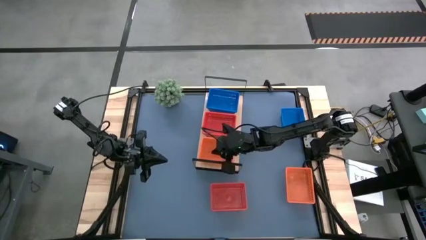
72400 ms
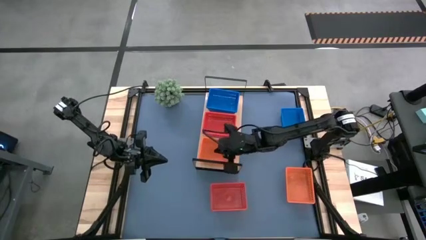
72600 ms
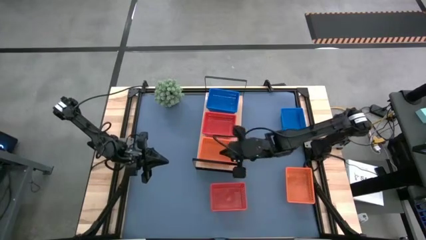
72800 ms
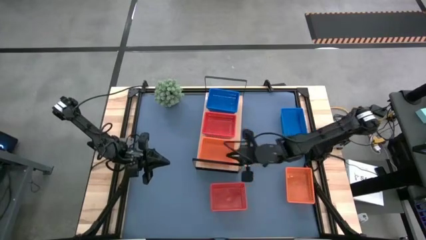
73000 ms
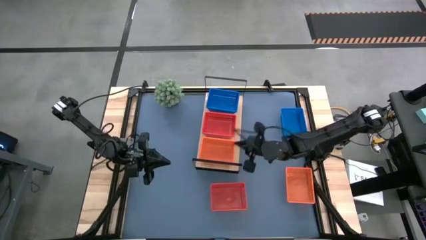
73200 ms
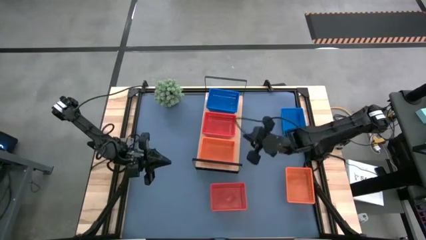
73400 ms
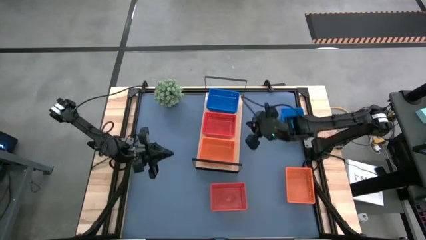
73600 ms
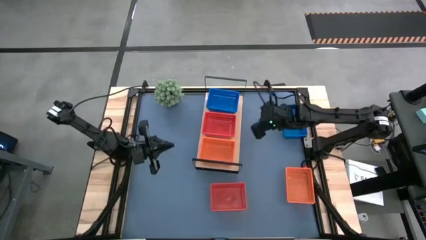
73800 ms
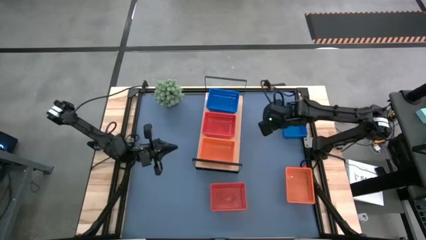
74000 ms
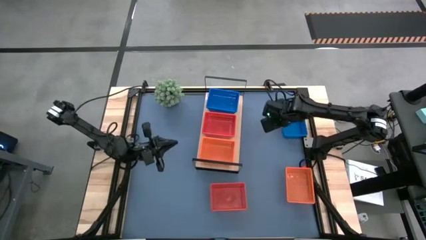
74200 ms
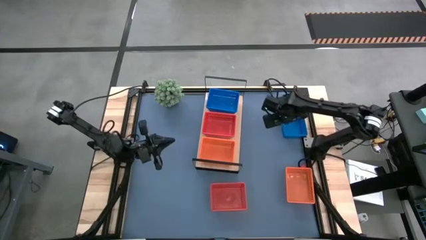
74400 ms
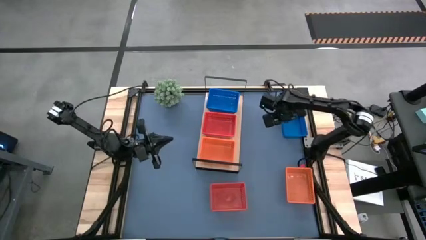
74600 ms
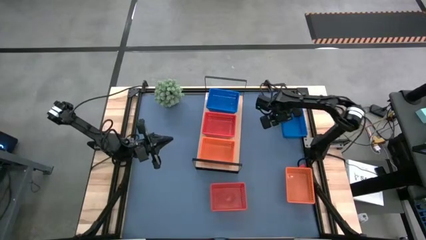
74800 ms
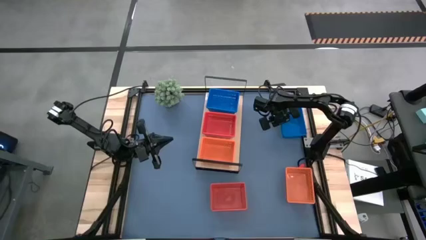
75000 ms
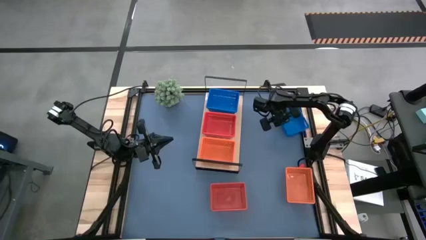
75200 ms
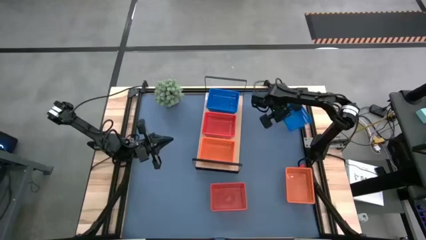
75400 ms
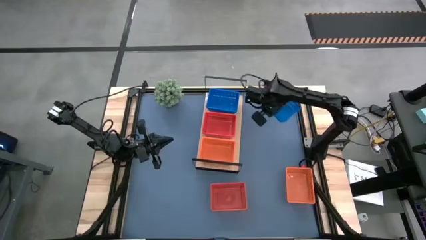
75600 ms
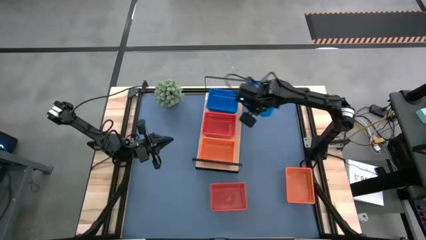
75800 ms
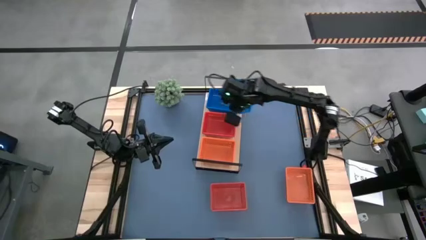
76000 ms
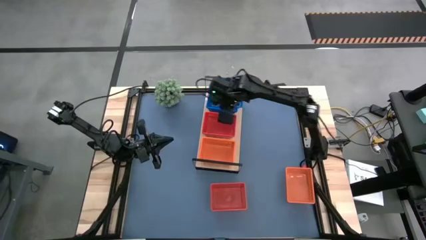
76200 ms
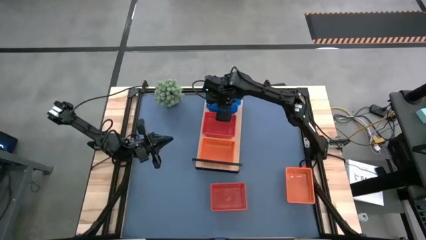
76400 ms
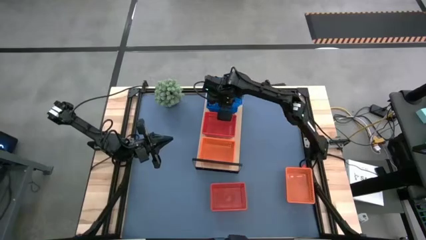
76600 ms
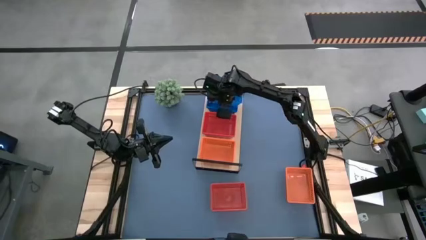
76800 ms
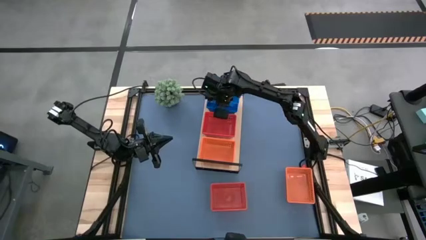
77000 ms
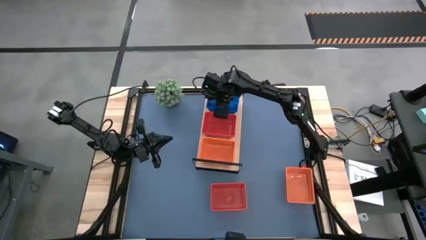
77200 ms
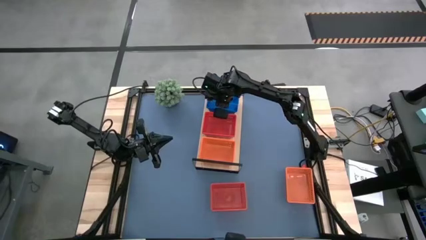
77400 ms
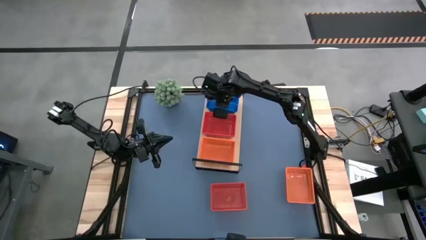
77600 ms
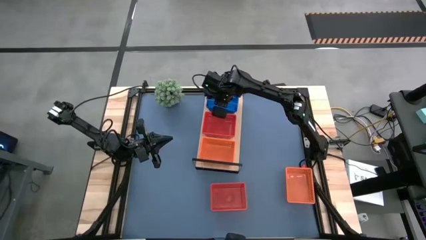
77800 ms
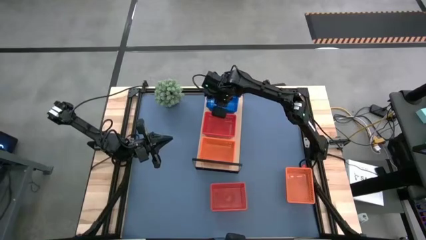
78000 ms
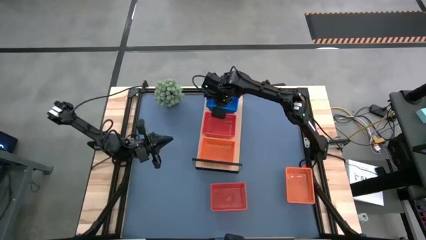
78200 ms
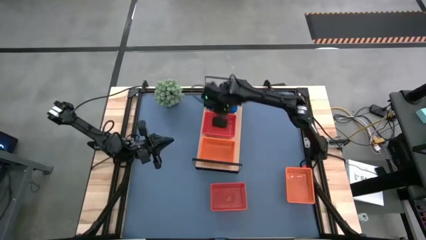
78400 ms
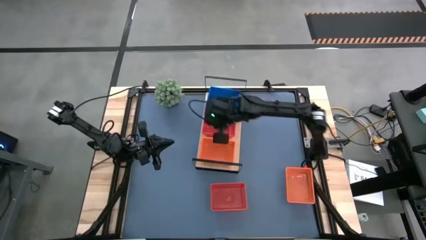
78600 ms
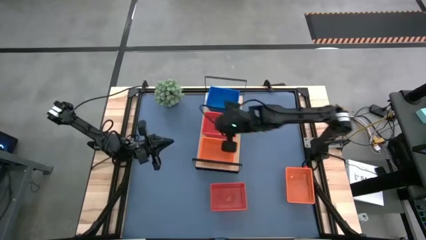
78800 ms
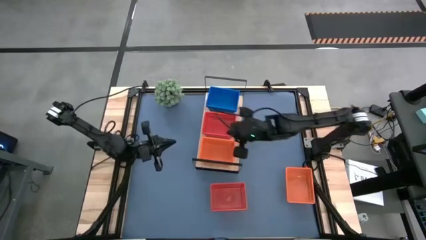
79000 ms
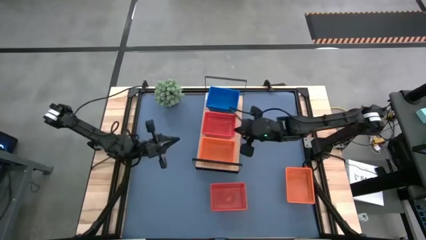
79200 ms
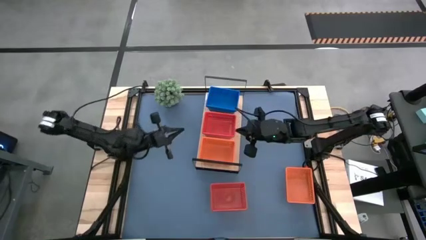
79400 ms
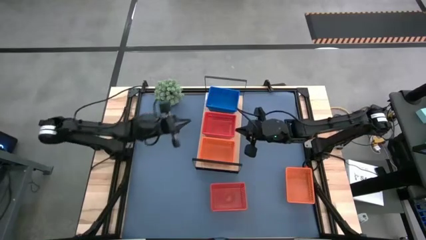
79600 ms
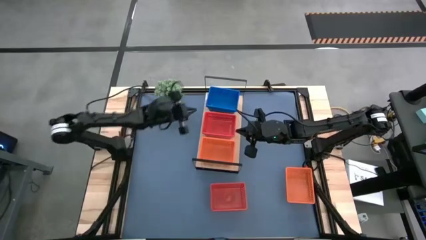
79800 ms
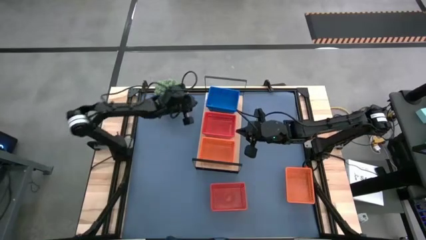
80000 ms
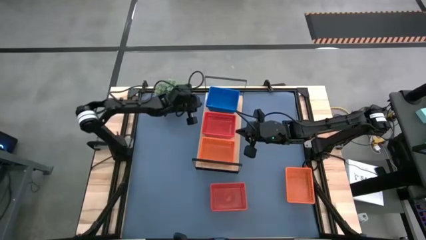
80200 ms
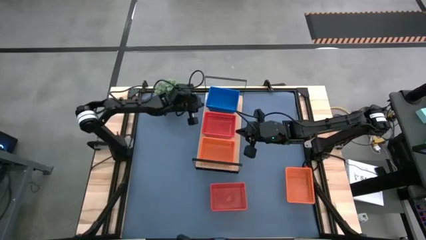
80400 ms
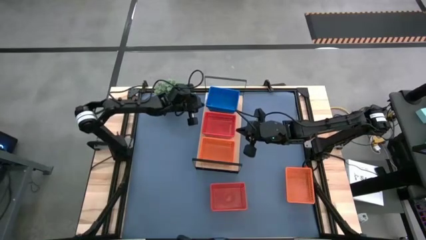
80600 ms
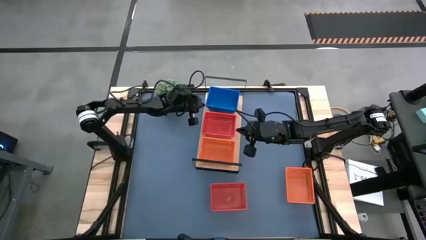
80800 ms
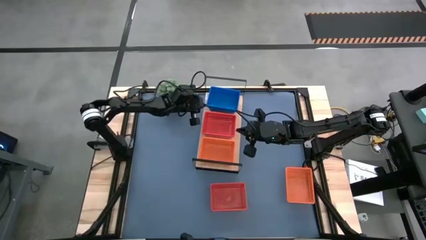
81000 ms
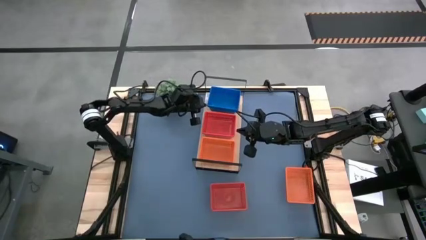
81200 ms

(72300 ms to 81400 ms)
Task: Stack baskets on shelf by color
Stack the blue bin on top of the blue bin

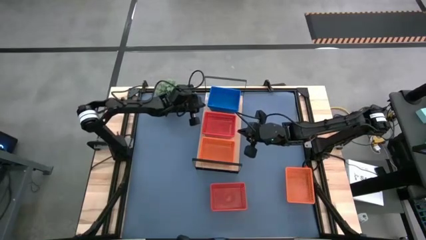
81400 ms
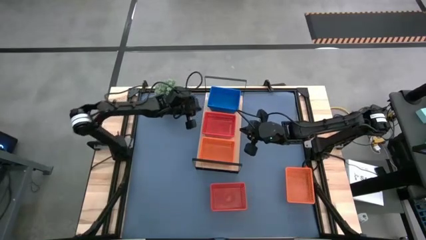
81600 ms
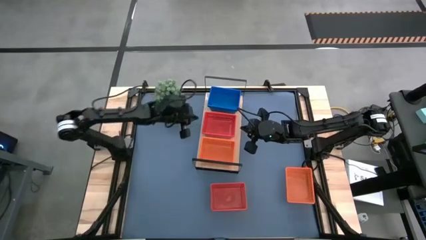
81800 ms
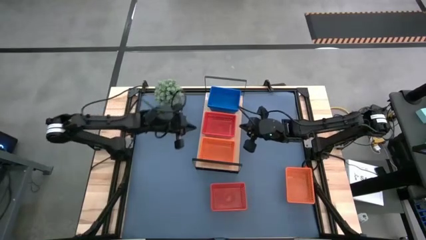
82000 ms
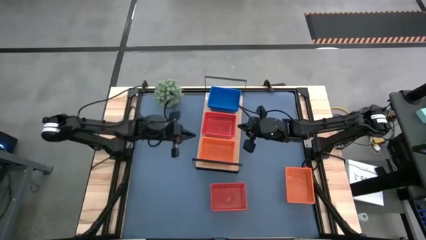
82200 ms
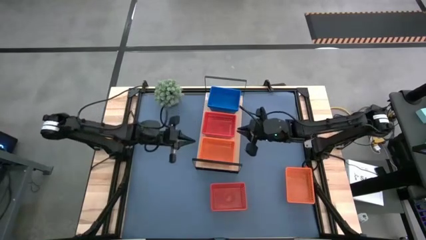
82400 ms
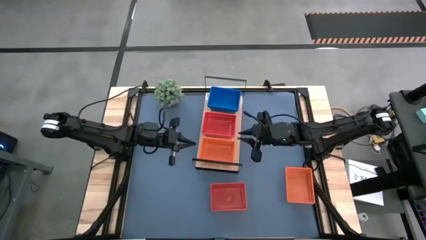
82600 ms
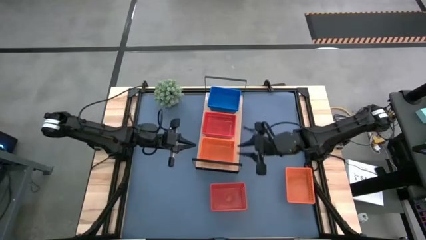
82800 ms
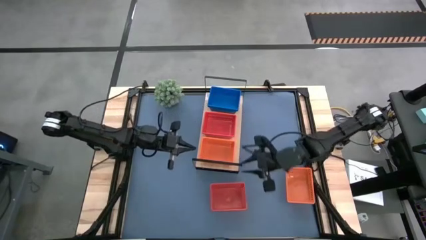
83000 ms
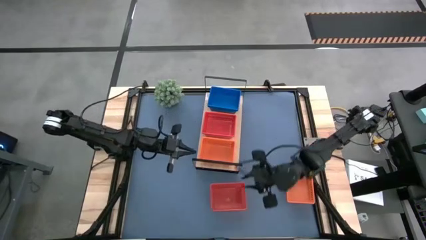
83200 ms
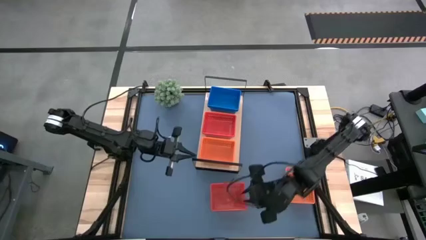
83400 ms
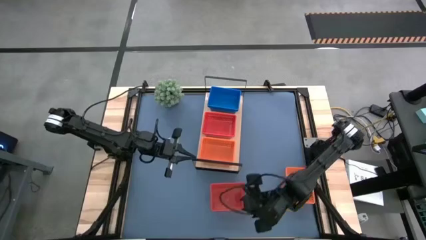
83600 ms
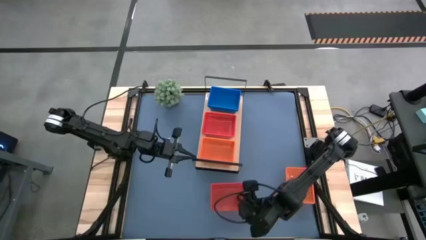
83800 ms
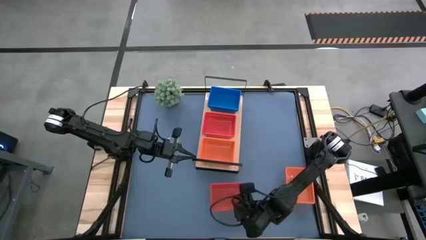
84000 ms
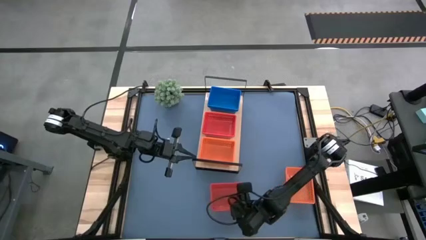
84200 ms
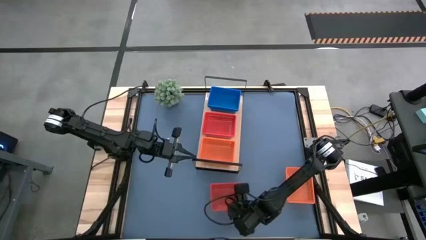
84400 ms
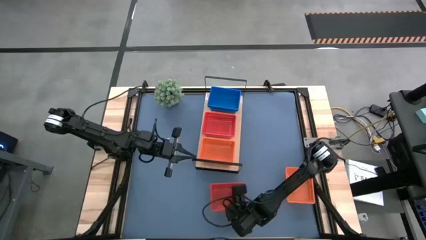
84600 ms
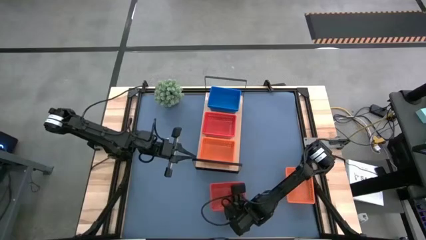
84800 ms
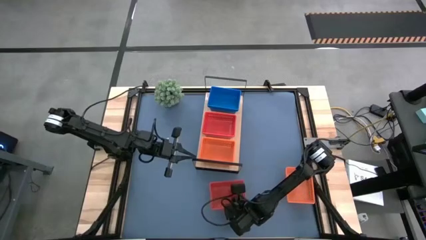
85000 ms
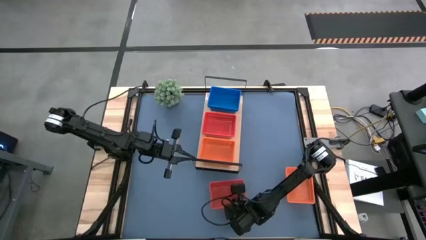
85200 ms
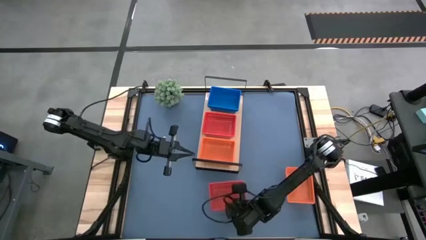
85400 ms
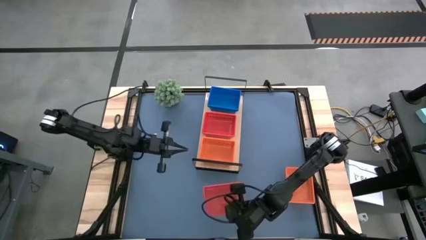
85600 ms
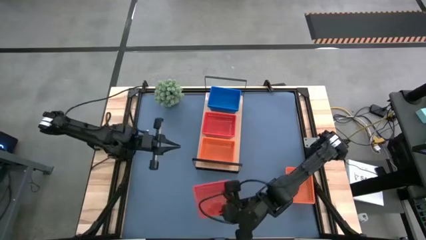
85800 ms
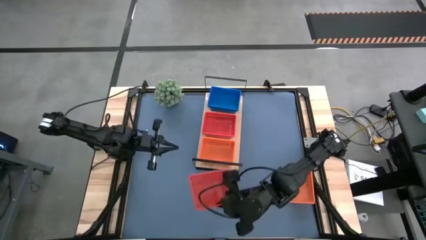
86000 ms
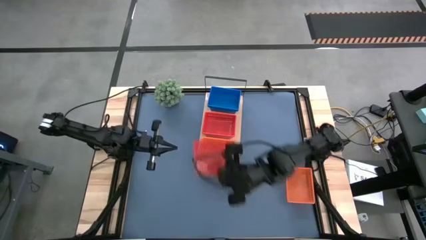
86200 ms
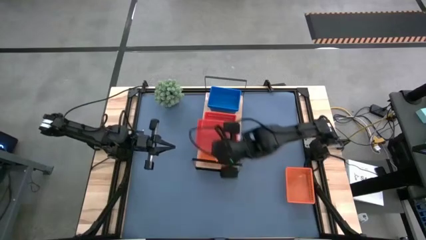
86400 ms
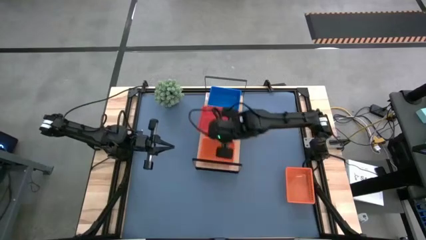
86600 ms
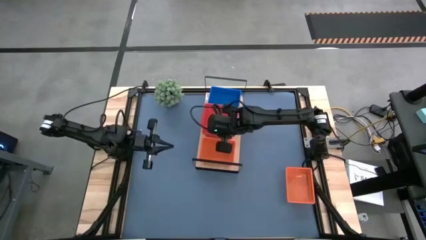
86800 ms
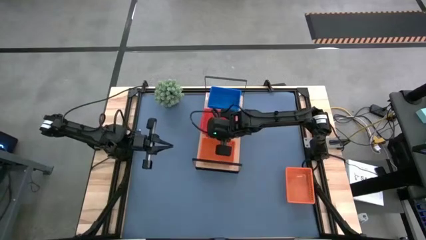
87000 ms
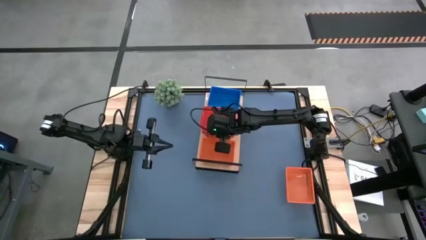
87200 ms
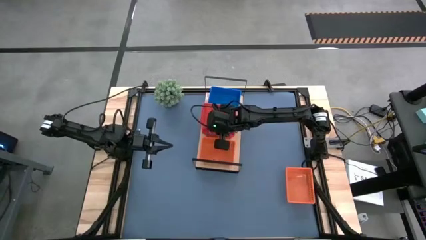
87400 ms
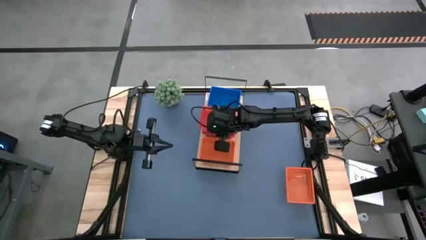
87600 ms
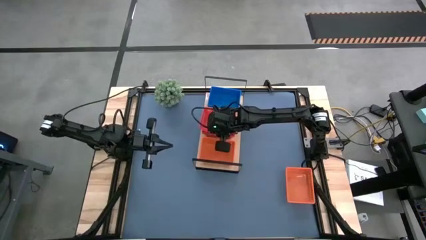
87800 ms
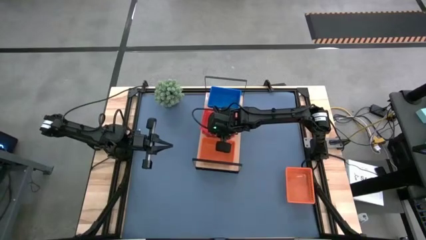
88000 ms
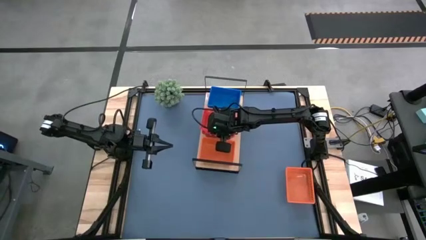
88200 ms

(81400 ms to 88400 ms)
Stack the red bin on top of the red bin
